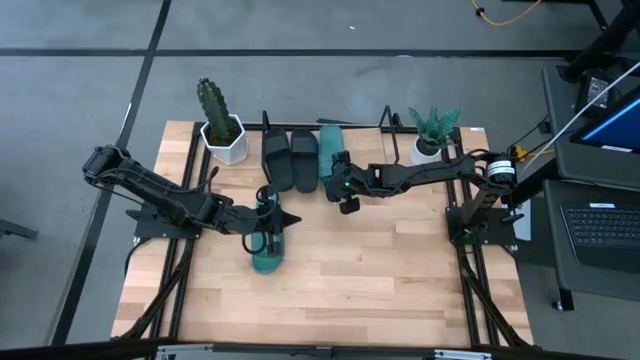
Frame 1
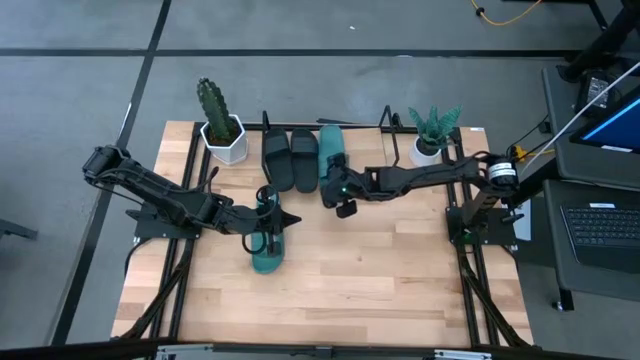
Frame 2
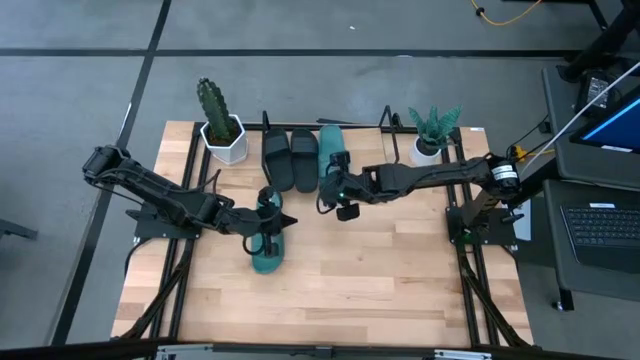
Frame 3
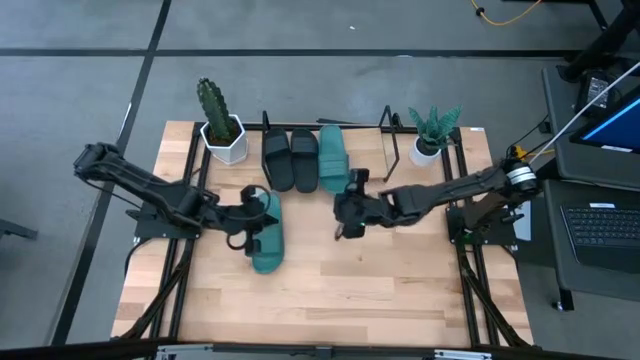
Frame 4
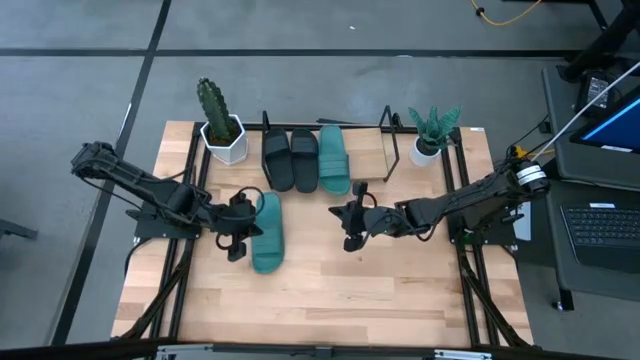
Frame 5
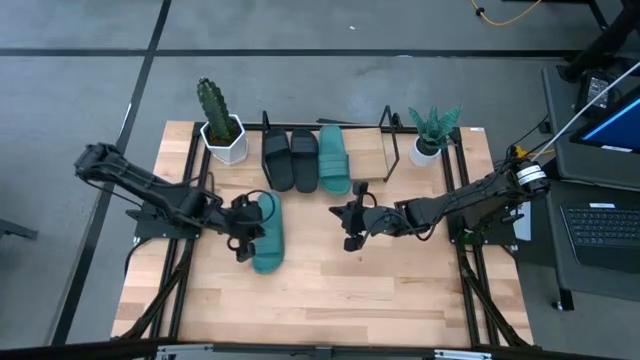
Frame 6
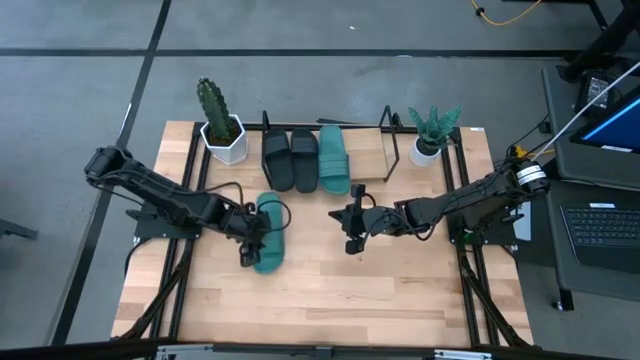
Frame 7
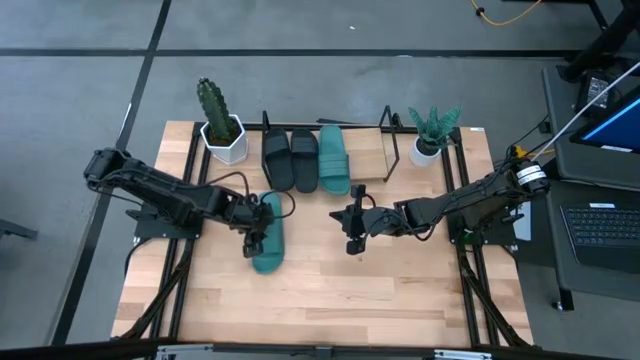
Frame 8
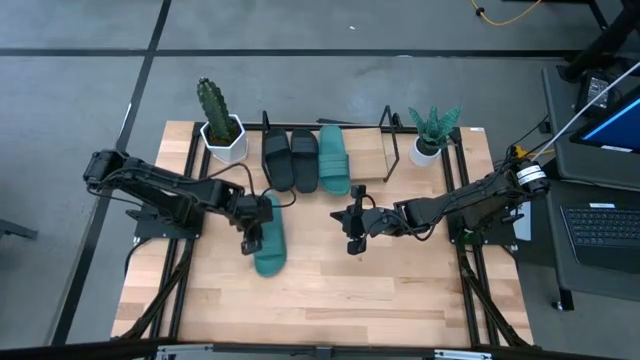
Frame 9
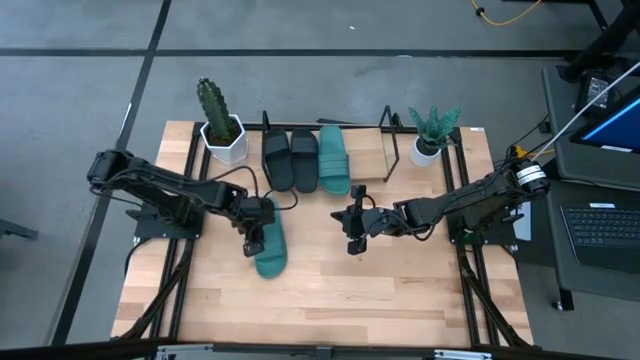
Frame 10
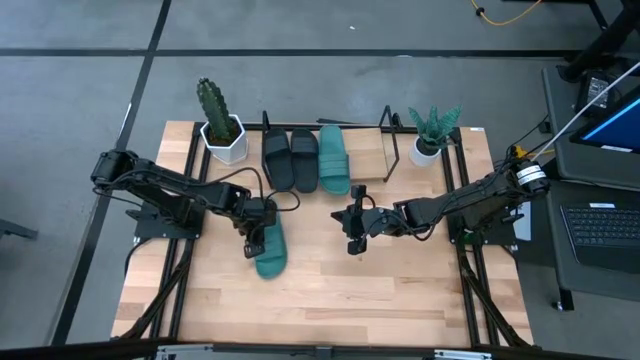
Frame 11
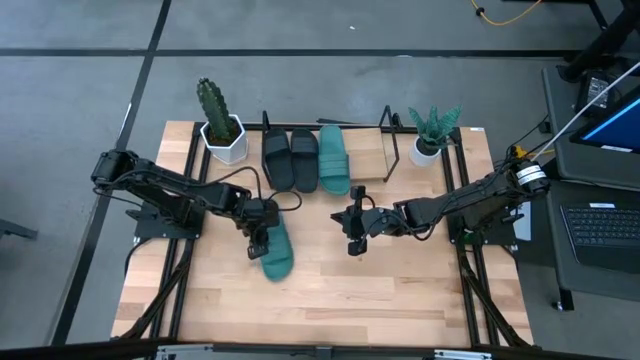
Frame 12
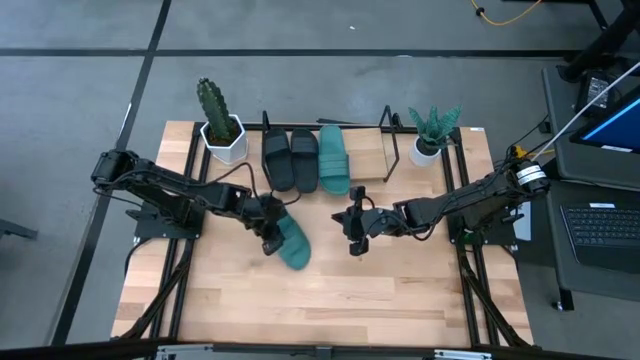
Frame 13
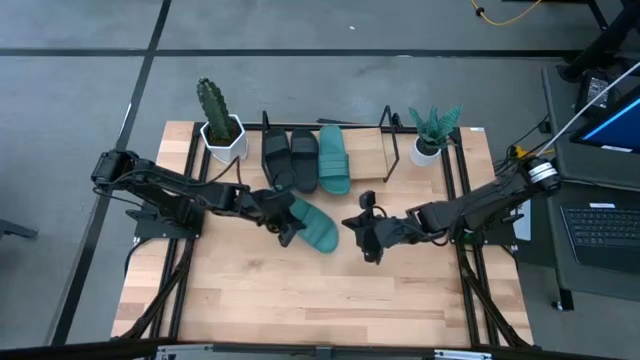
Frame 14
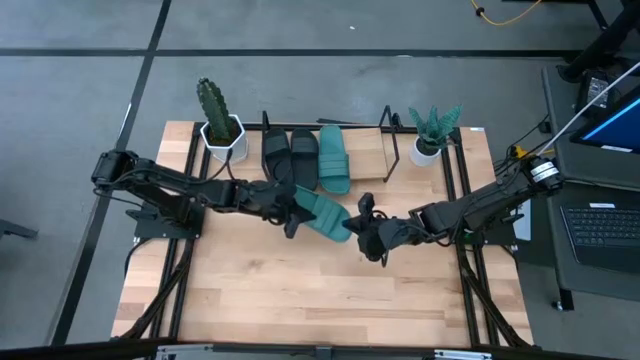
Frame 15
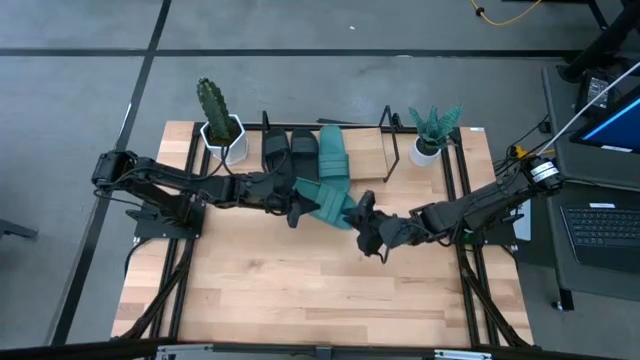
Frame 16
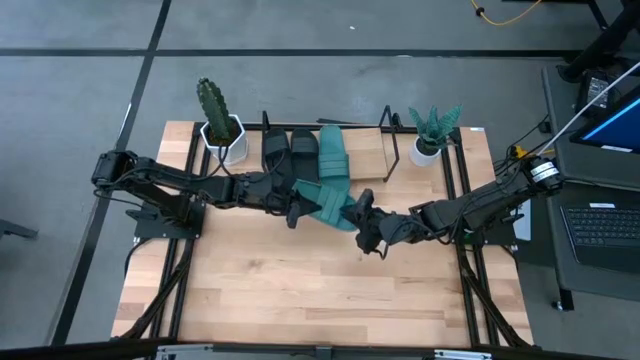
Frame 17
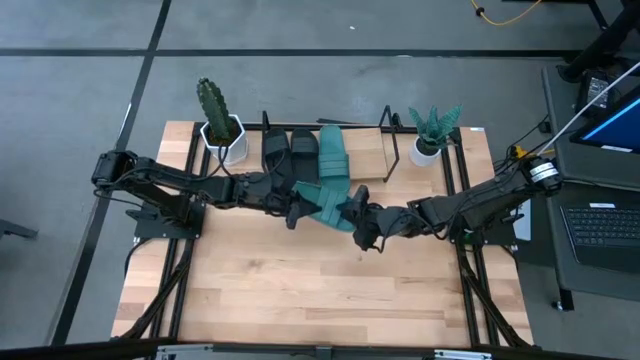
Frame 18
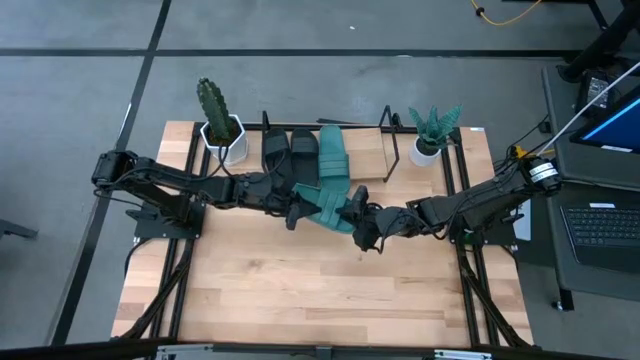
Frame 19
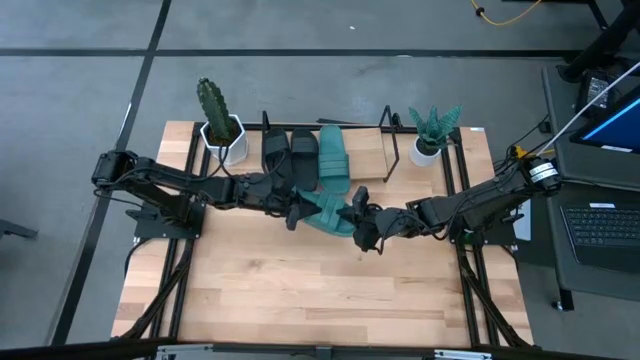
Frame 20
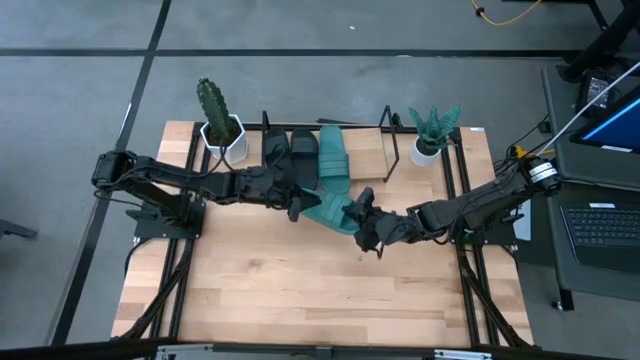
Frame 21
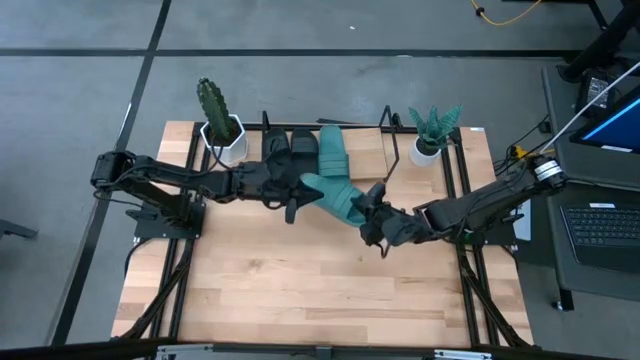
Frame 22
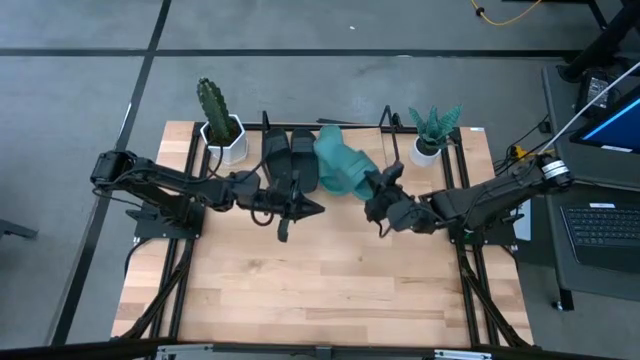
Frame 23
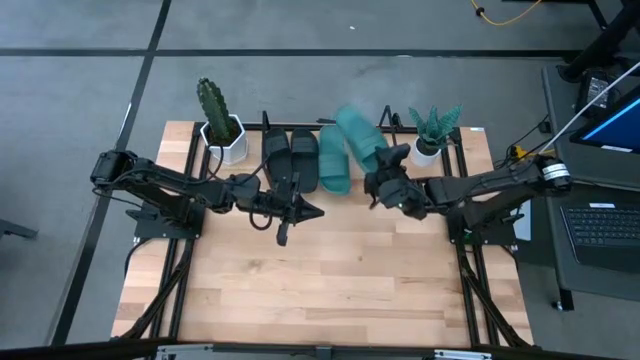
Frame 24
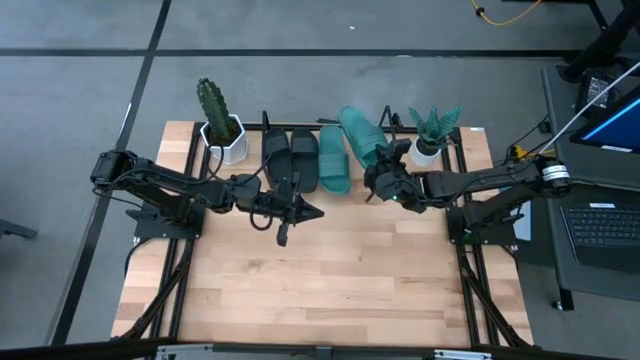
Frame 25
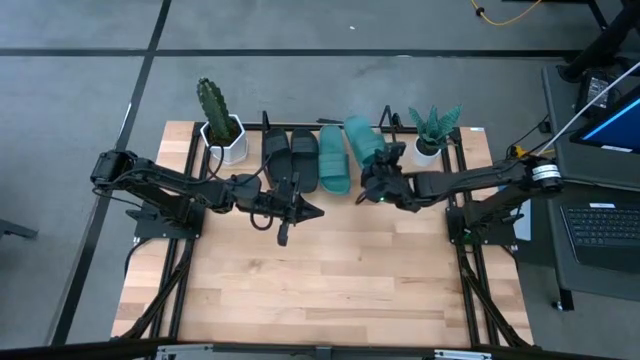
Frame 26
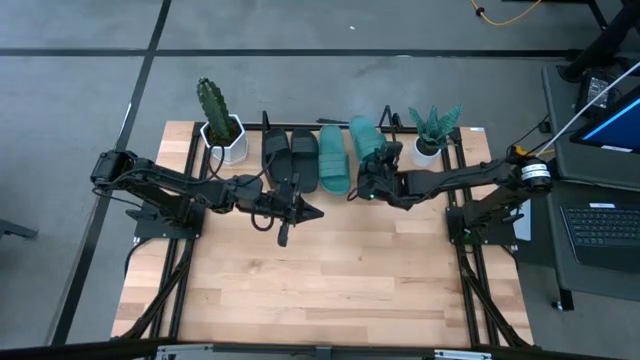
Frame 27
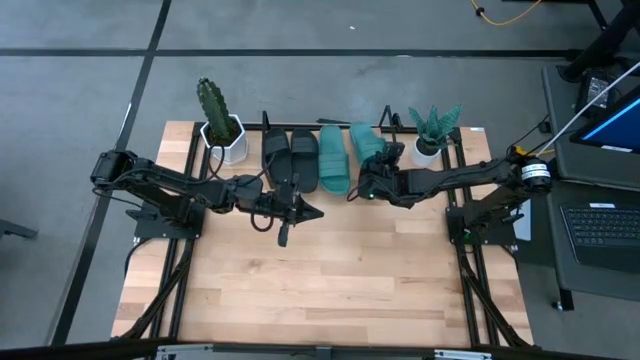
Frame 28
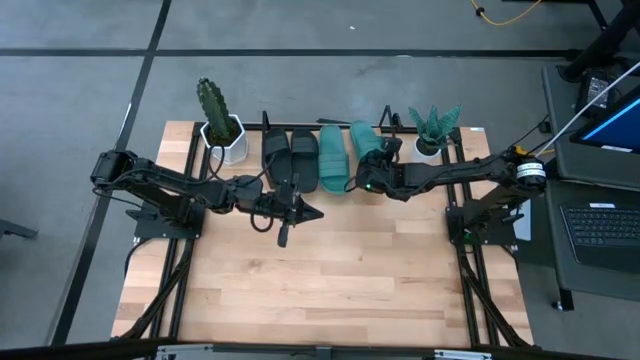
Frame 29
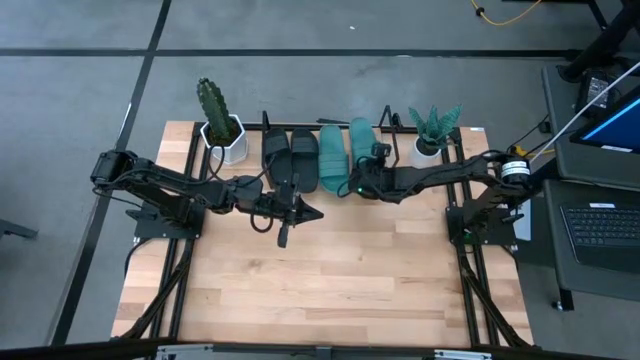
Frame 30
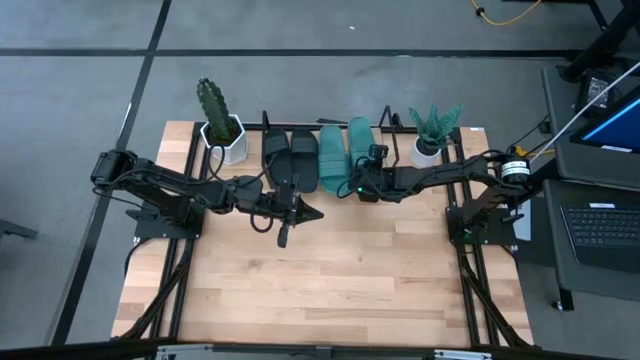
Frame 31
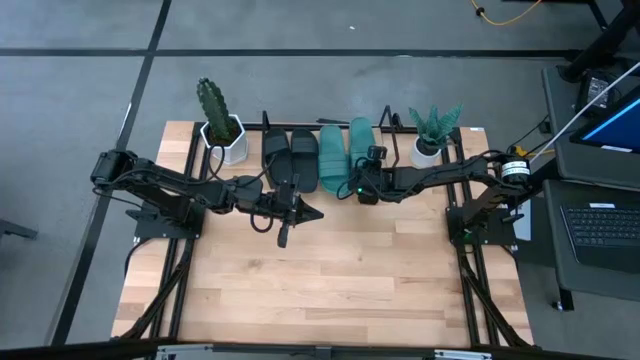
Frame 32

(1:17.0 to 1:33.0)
Task: Pick and place slides into the shelf
Put the green slide on the shelf
